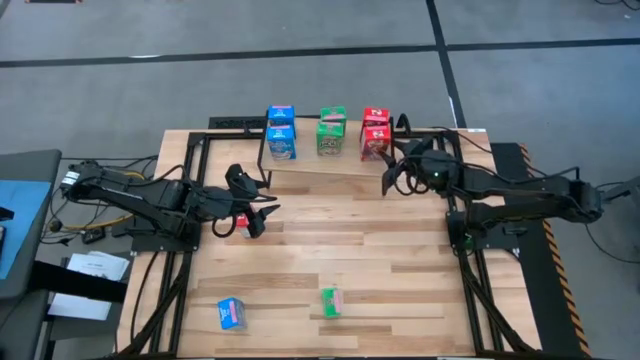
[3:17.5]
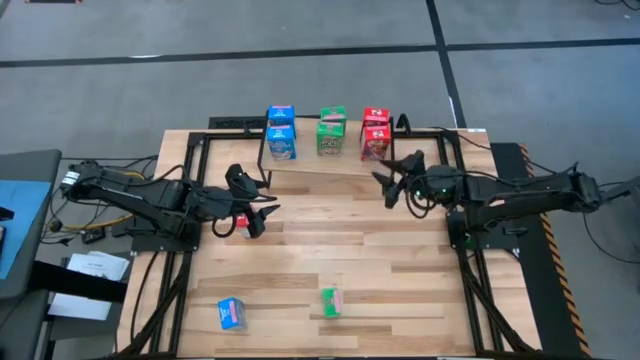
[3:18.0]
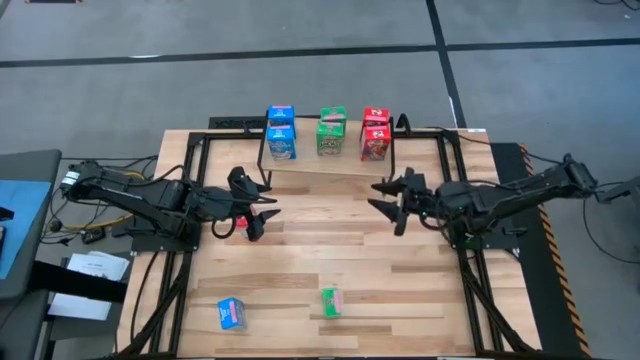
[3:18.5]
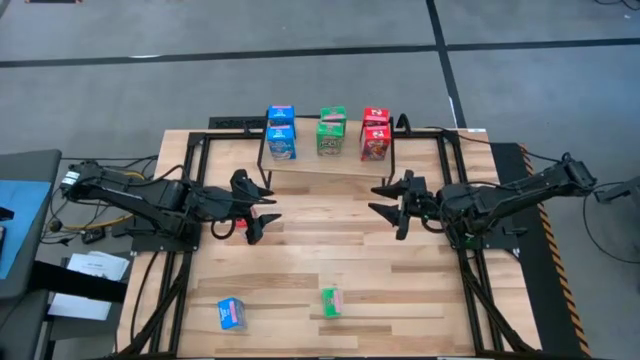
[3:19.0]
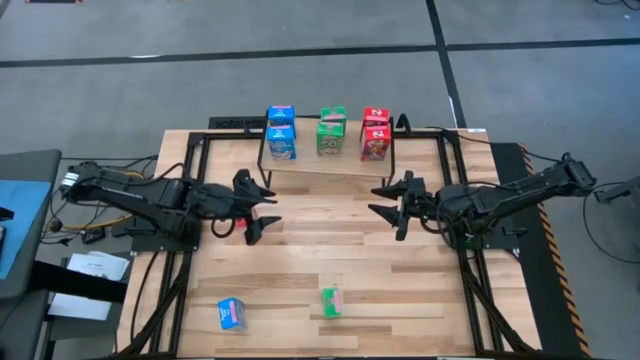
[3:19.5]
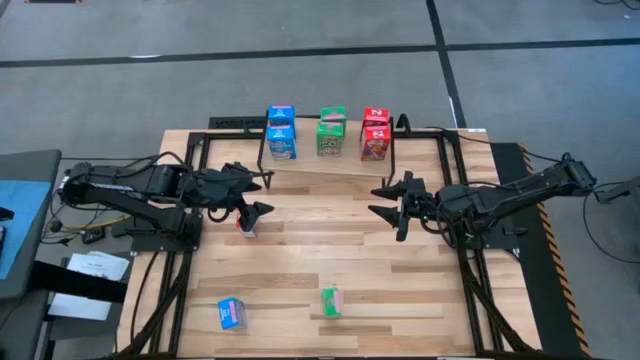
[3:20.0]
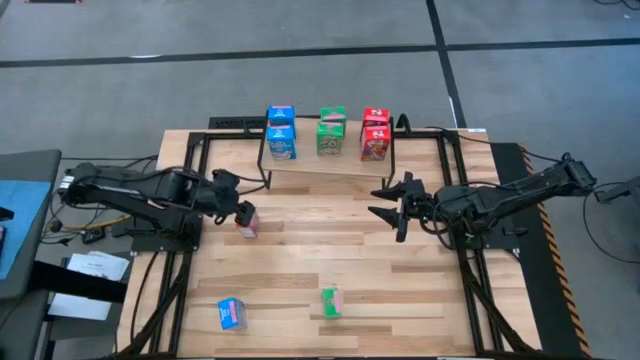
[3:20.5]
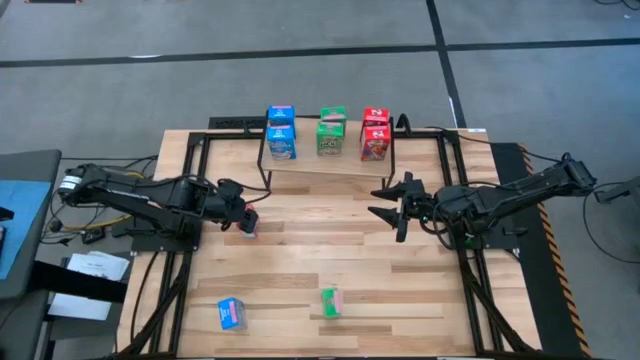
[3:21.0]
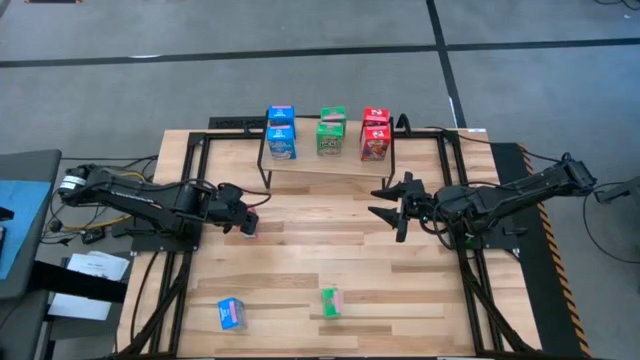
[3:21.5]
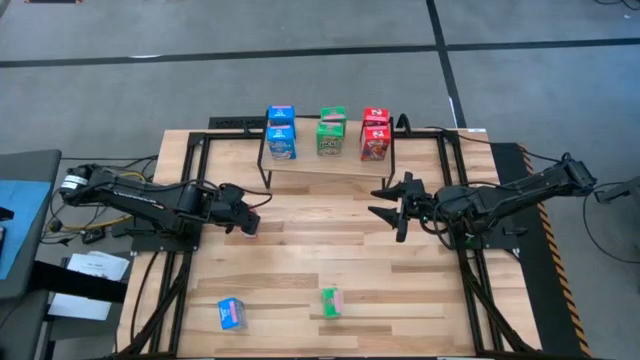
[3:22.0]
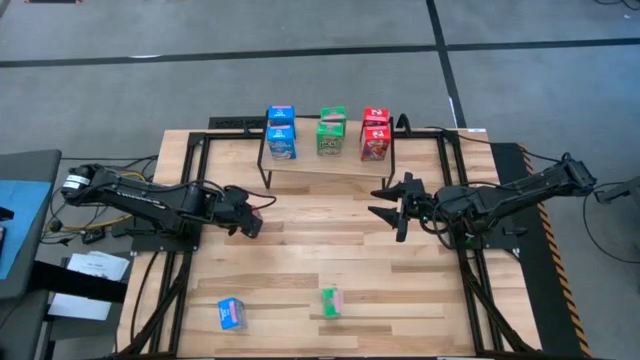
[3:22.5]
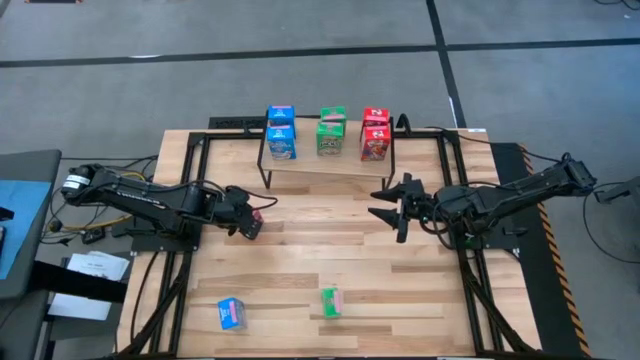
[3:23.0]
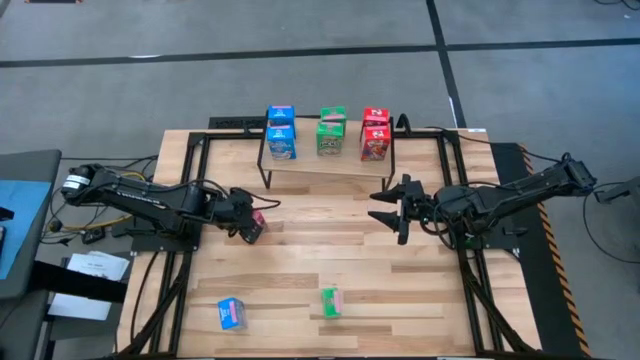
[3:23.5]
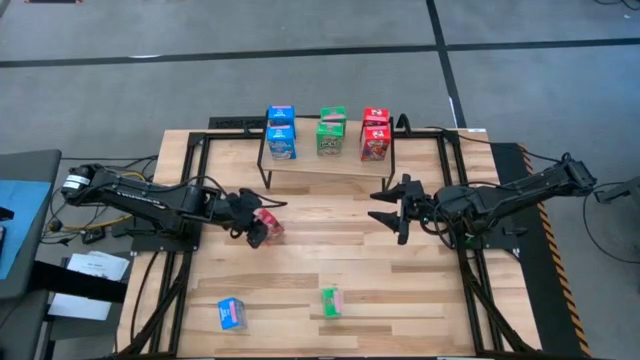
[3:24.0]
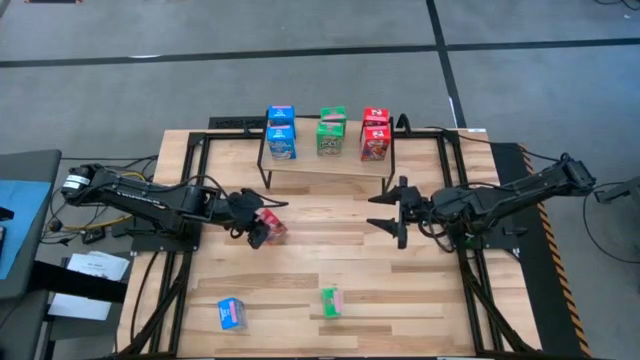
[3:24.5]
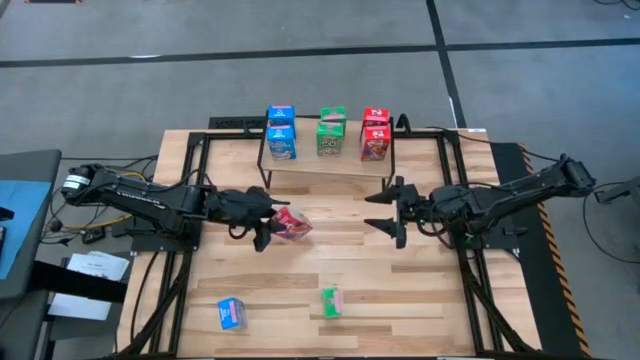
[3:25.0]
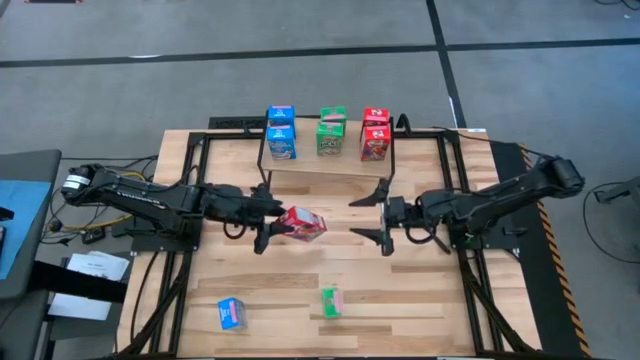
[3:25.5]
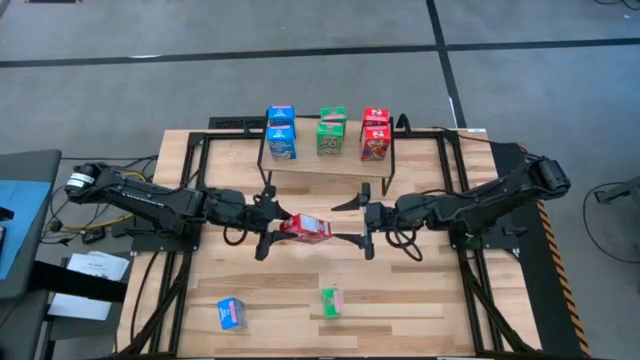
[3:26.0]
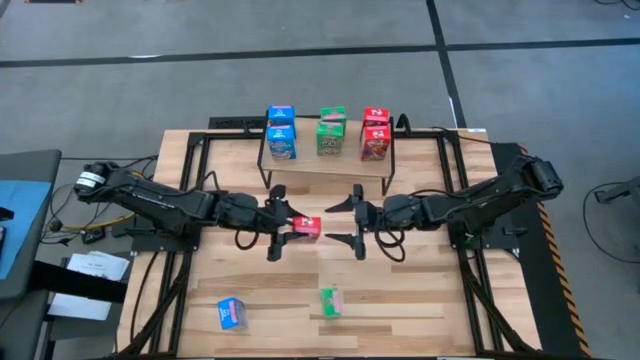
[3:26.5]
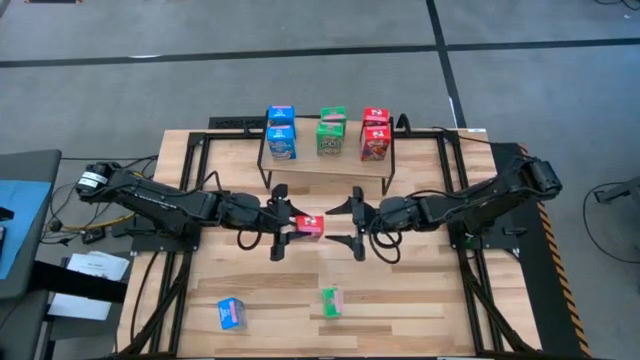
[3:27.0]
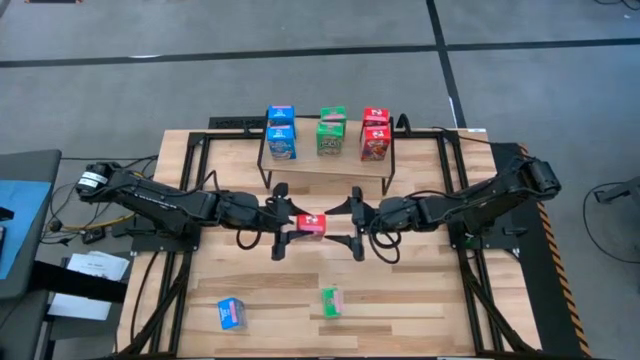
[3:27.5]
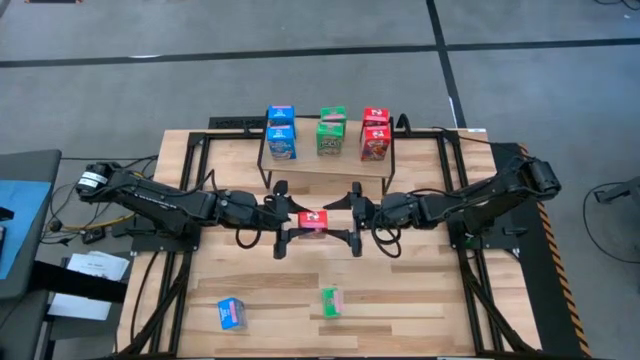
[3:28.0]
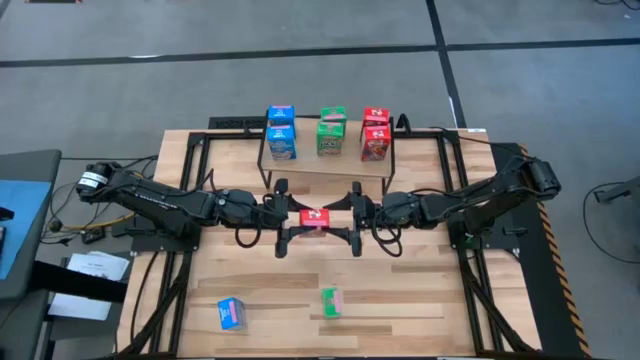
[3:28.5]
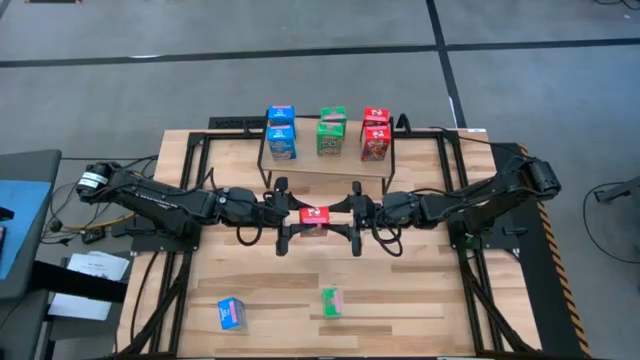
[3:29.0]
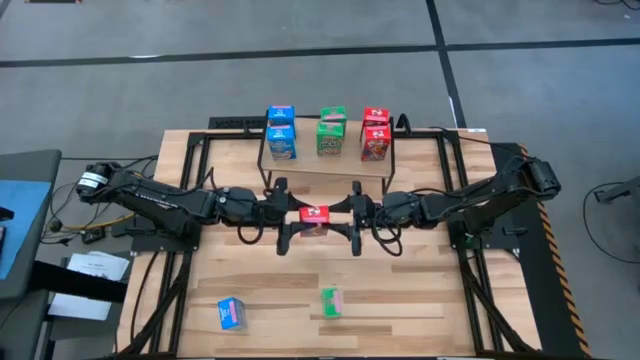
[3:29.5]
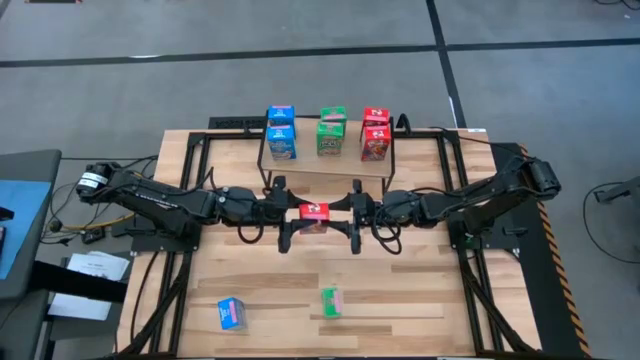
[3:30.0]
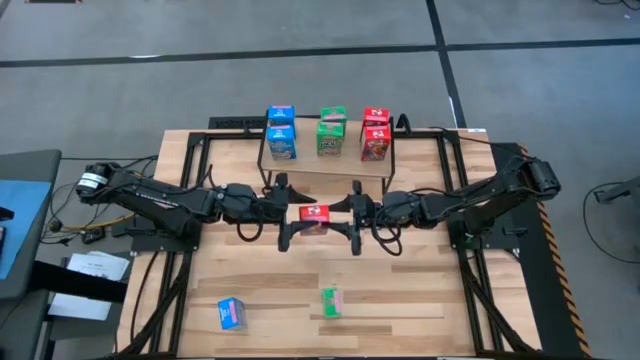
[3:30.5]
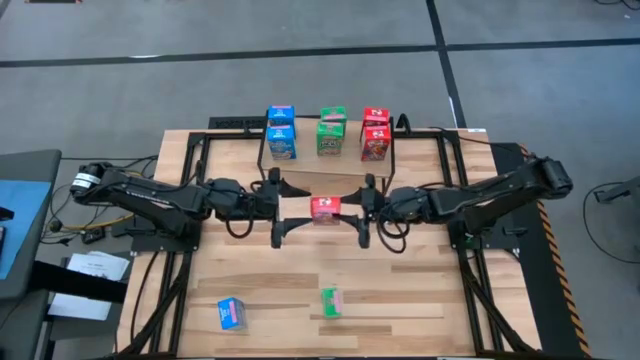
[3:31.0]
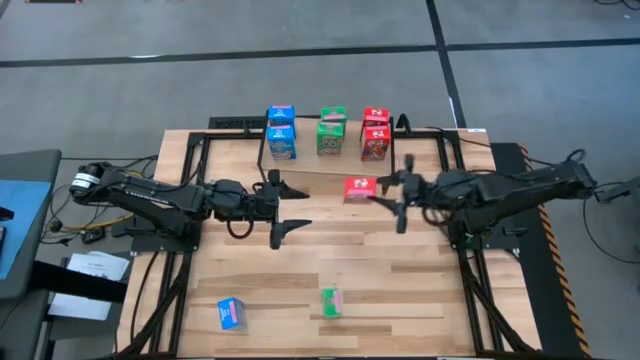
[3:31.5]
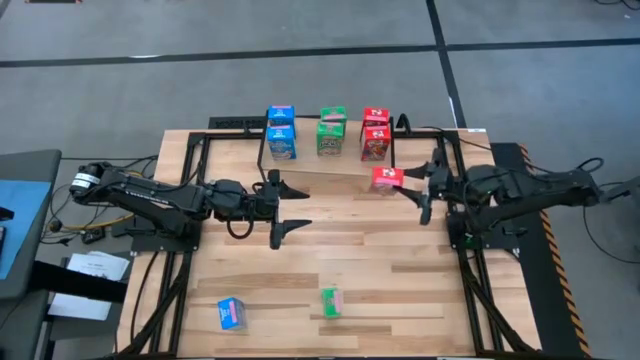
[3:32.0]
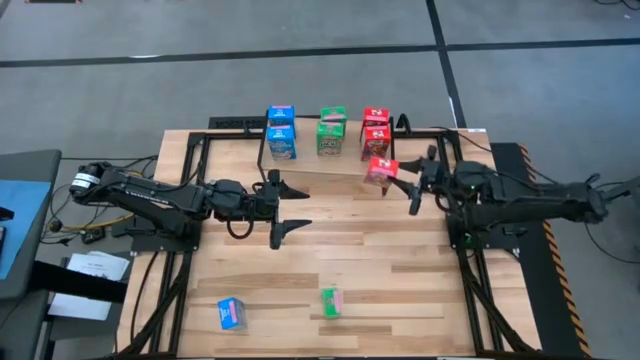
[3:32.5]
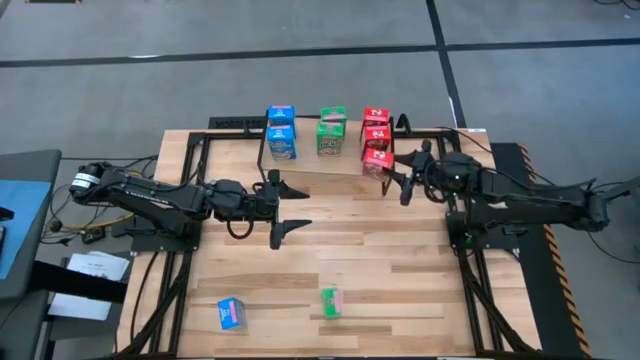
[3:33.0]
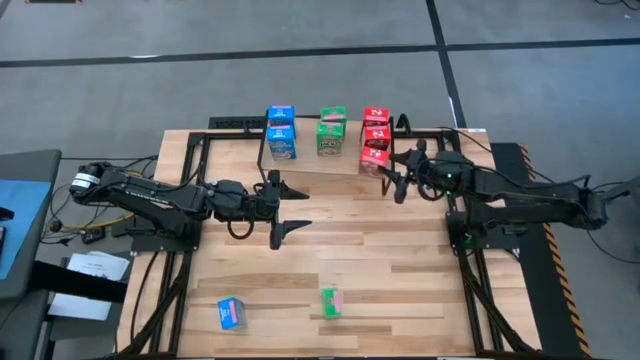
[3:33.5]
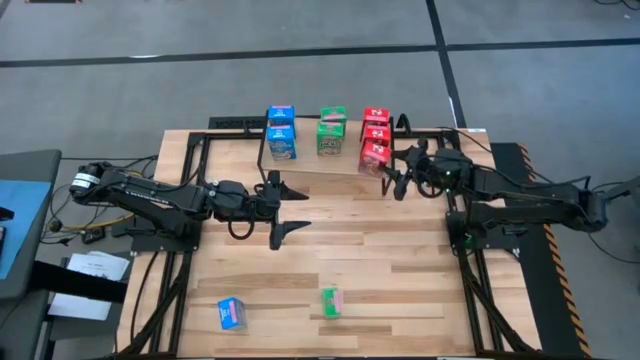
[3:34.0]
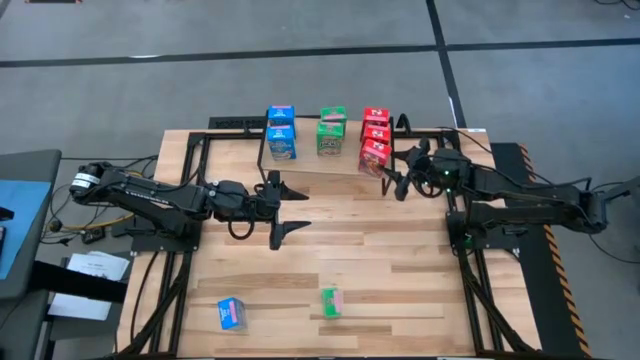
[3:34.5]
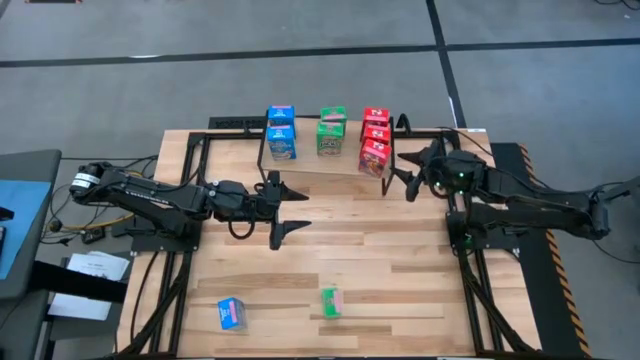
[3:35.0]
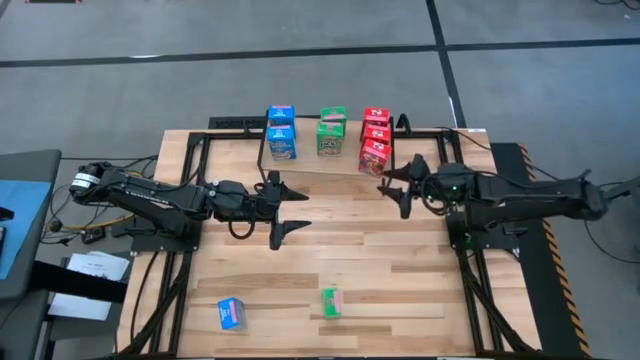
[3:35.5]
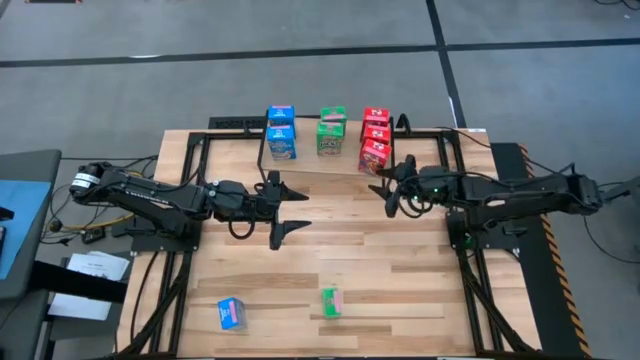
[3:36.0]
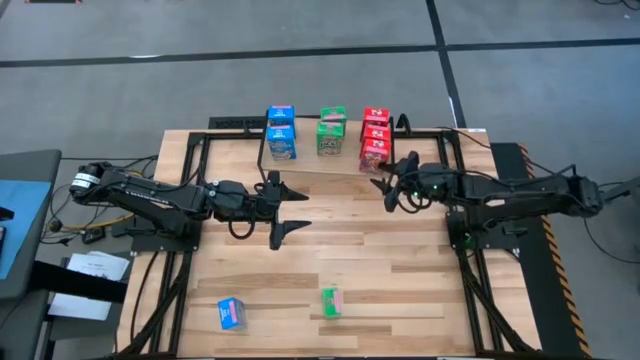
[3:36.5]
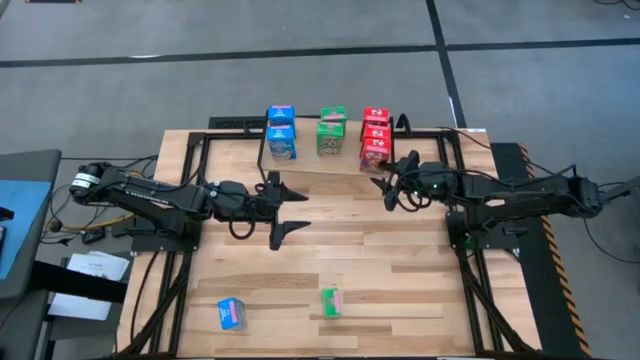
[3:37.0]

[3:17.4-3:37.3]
Task: Stack cereal on shelf
Put the red cereal box on the shelf aligned with the other red cereal boxes

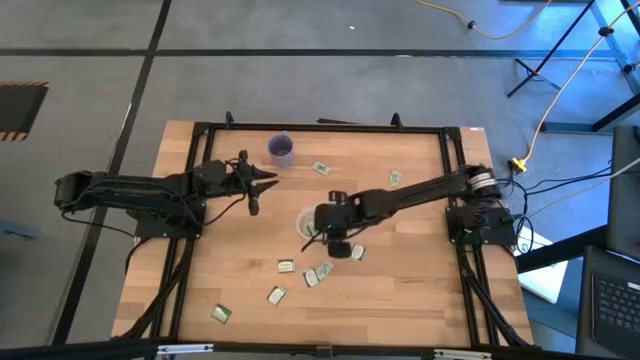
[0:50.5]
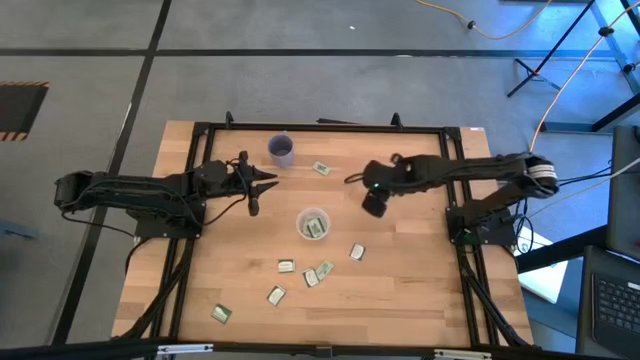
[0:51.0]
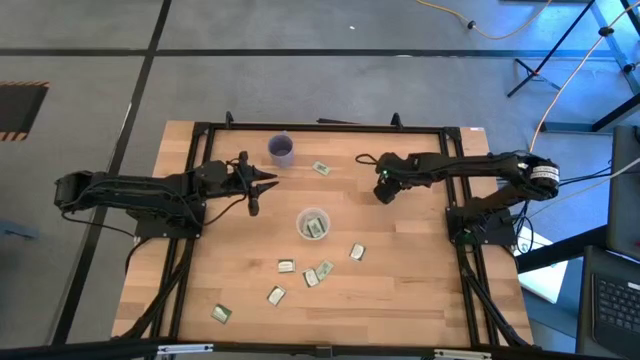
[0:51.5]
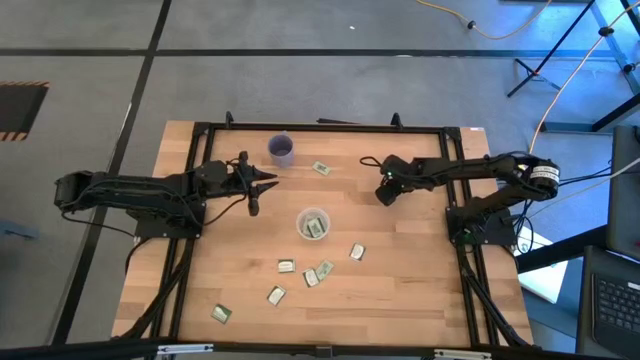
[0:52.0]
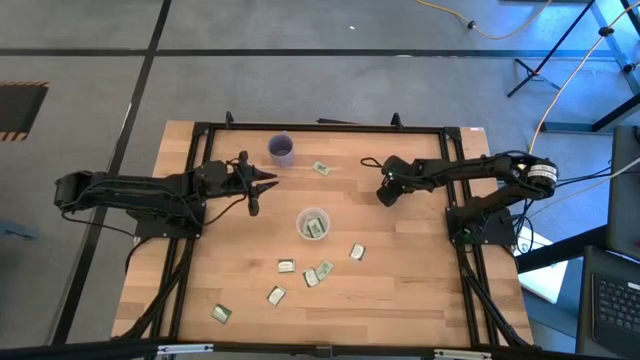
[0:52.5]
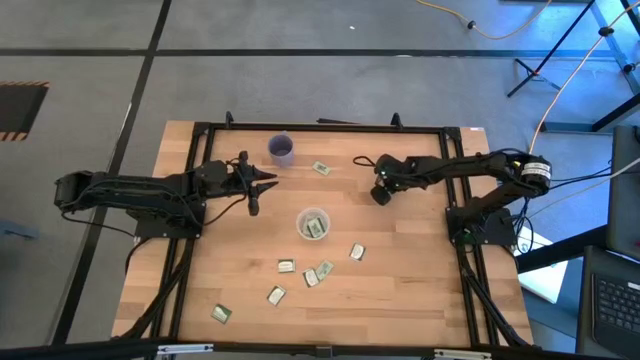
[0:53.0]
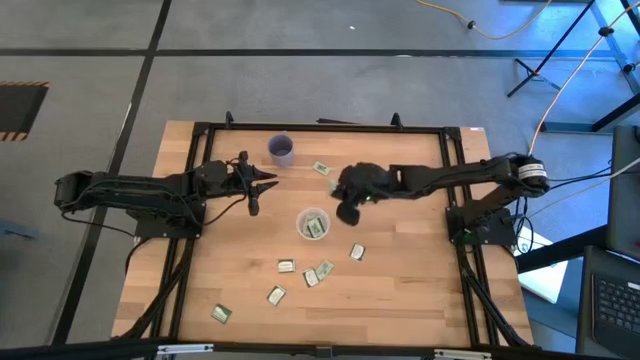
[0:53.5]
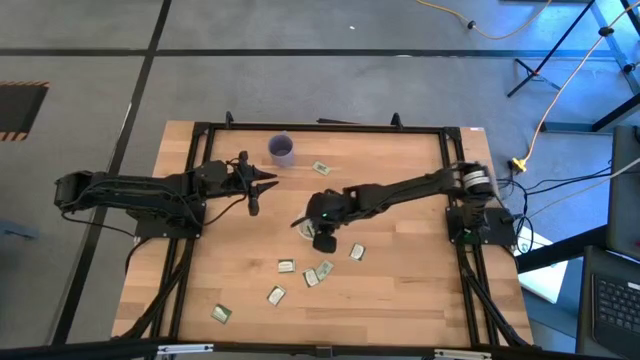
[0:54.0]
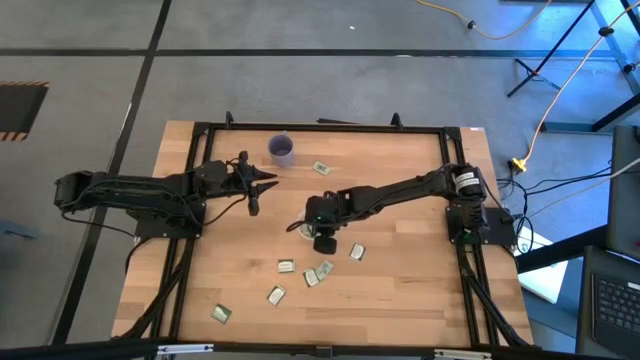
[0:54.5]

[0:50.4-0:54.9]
Task: Pick and place Stevia / Truvia into bins
Put the stevia packet into the transparent container
